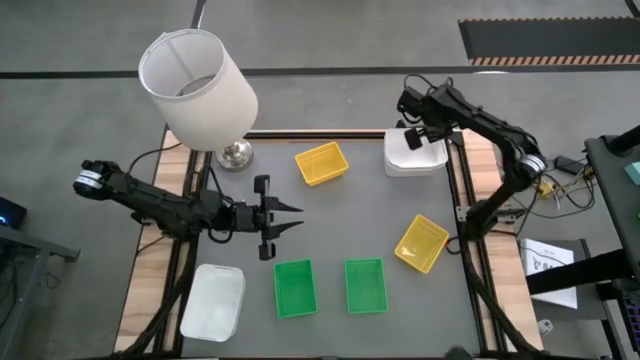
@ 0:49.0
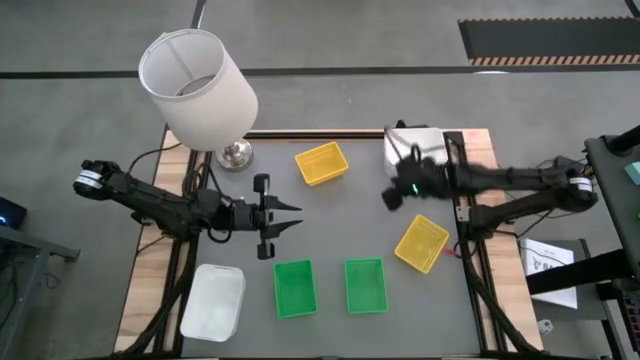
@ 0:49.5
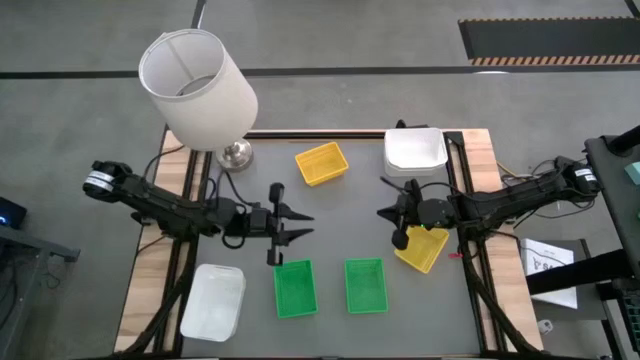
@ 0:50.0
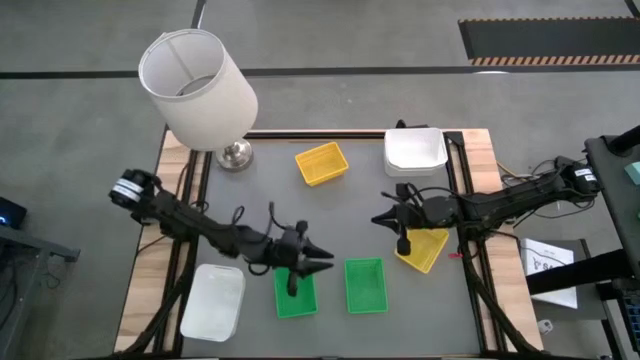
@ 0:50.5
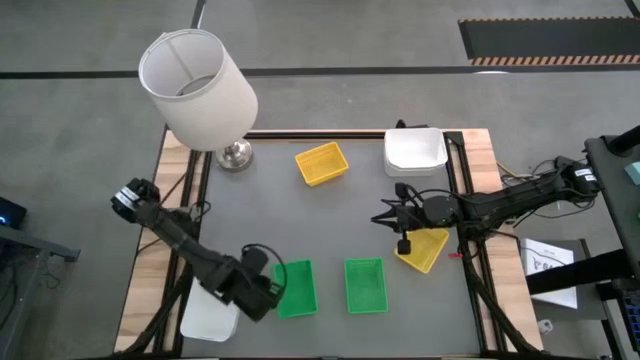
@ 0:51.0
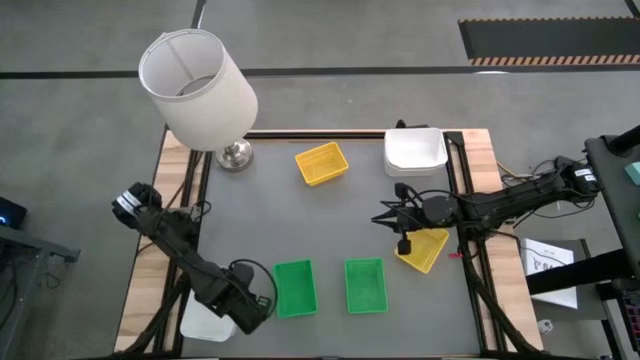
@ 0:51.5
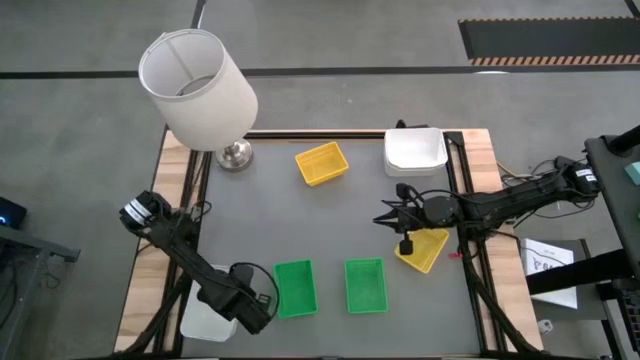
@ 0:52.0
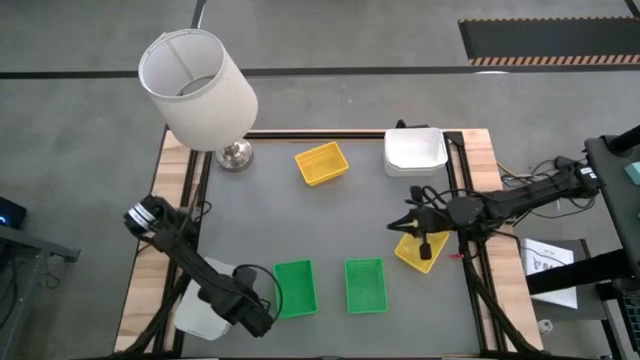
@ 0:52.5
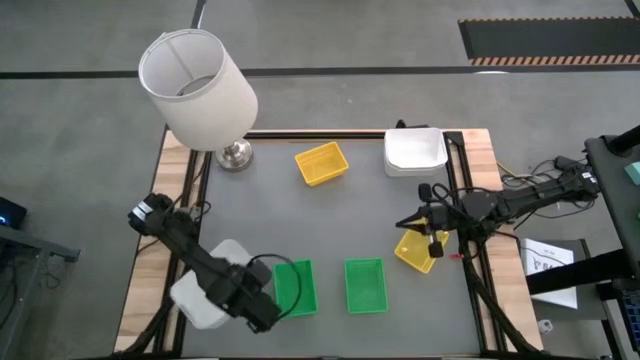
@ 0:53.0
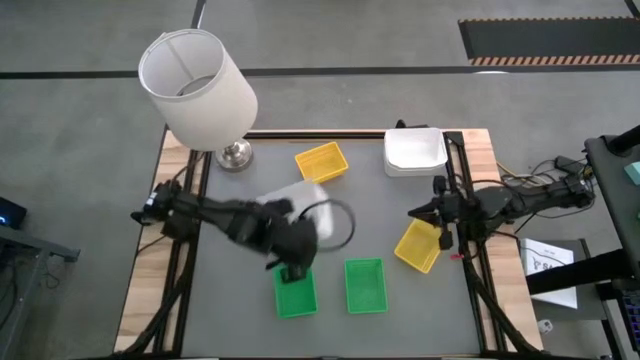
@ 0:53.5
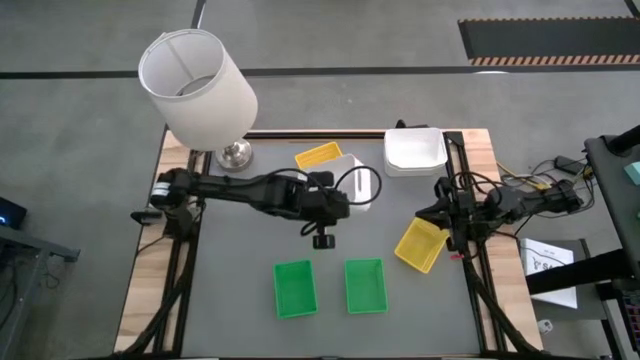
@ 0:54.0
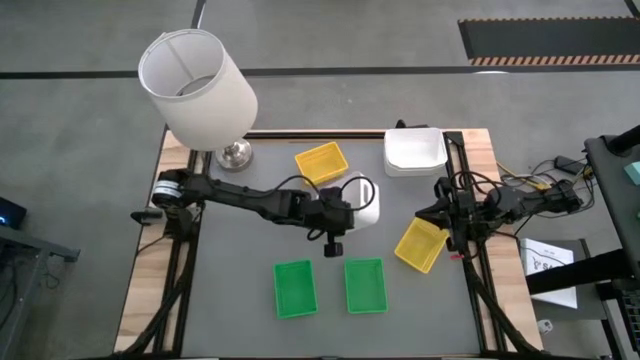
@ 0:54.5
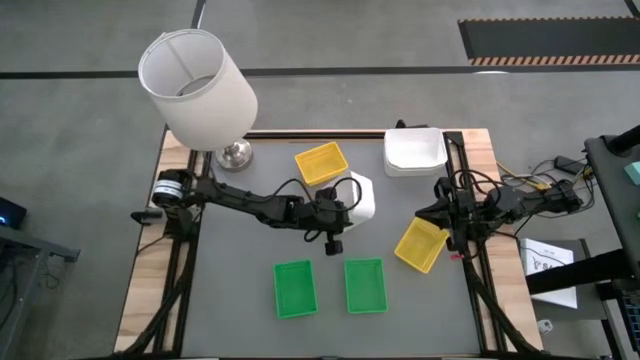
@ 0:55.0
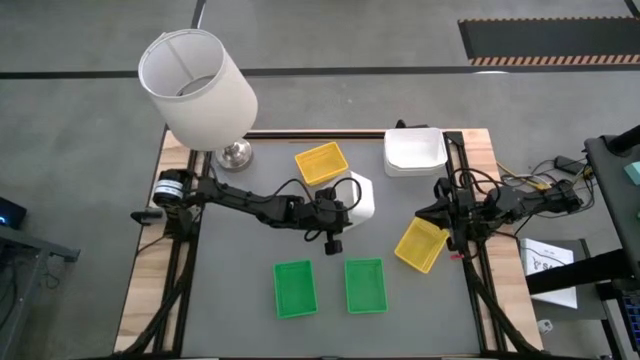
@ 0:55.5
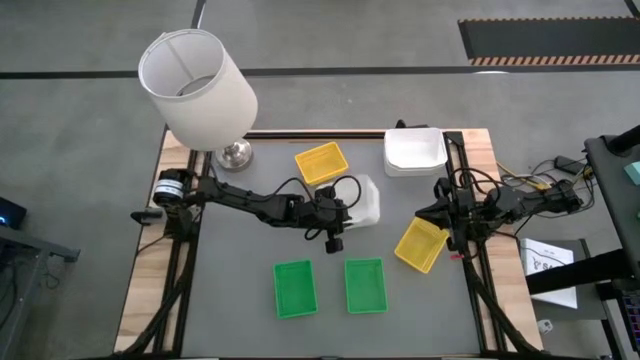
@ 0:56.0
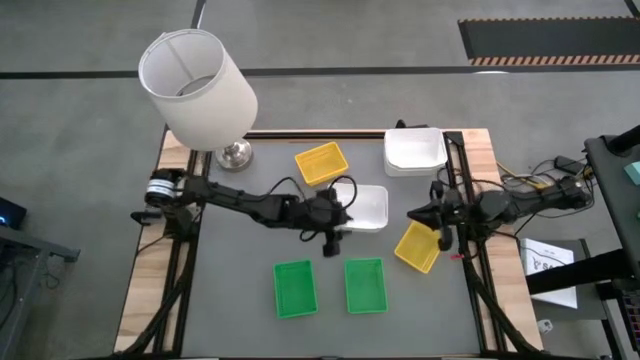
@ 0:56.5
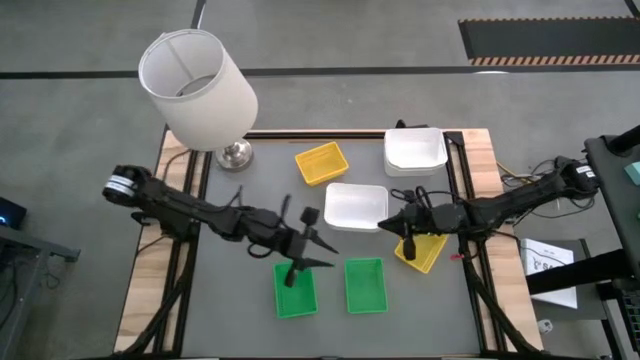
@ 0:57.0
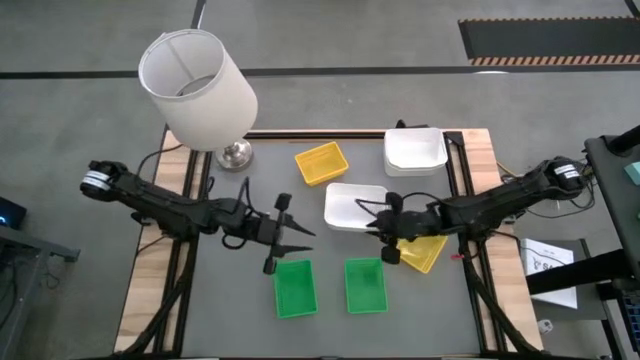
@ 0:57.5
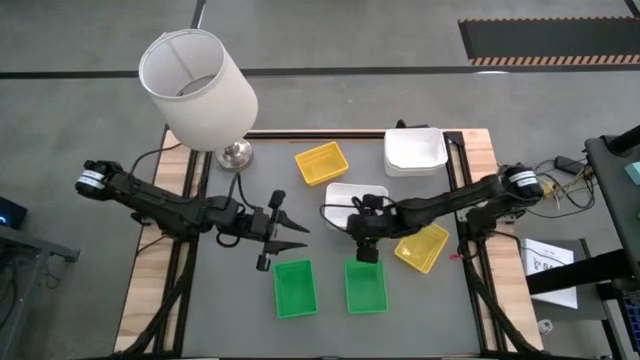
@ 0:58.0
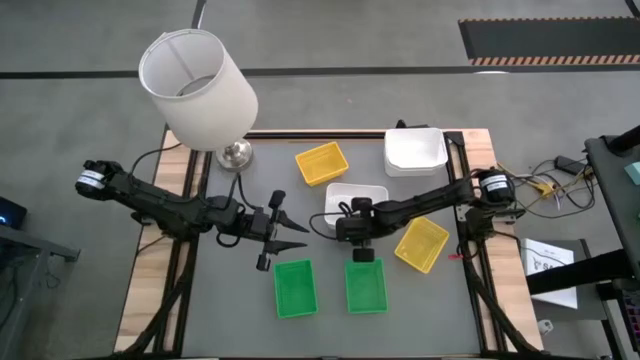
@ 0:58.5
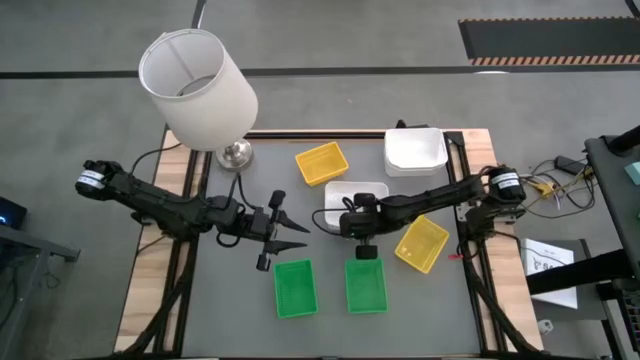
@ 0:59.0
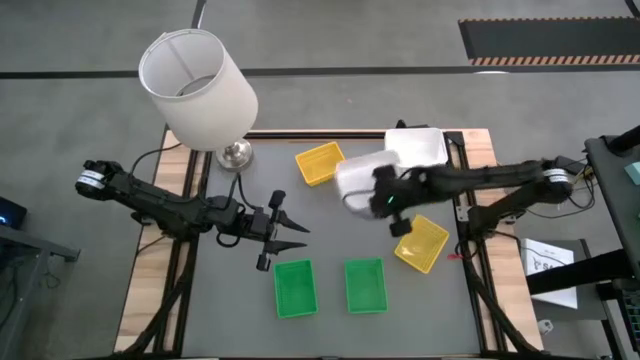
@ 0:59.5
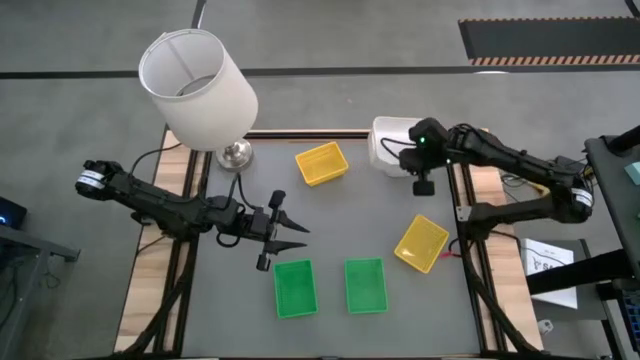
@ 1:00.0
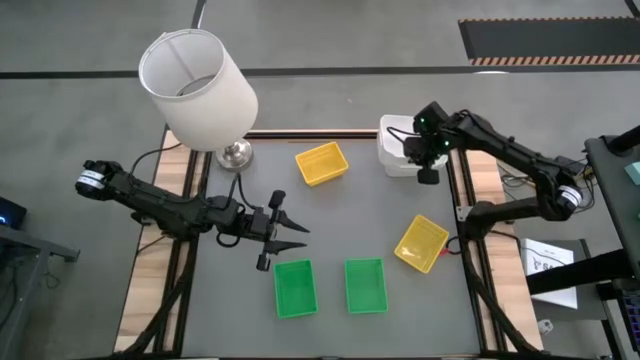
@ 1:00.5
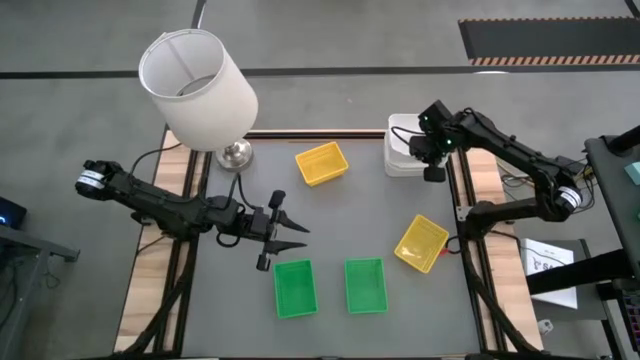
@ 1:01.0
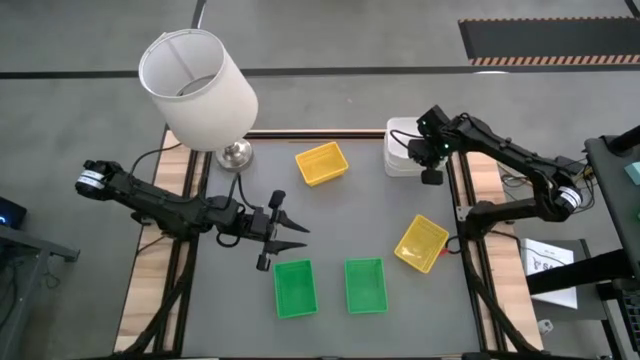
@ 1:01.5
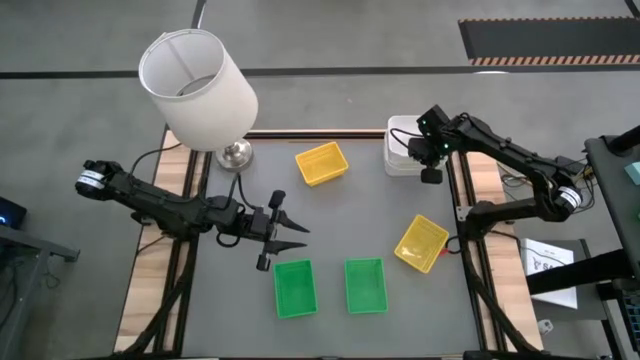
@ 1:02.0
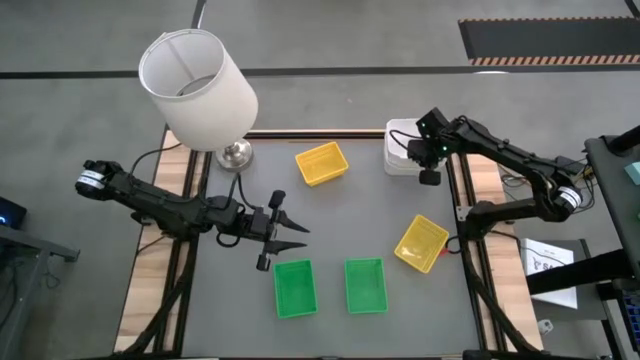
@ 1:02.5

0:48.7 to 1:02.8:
Stack the bottom white bin on the top white bin

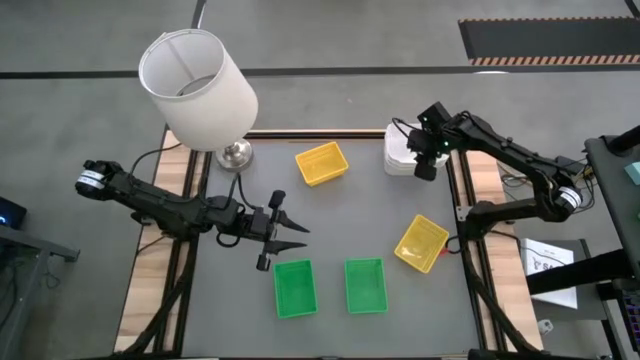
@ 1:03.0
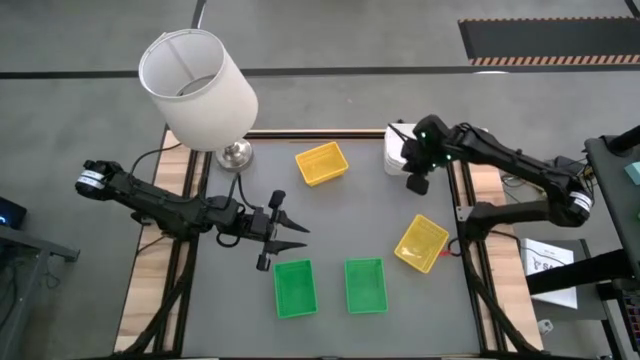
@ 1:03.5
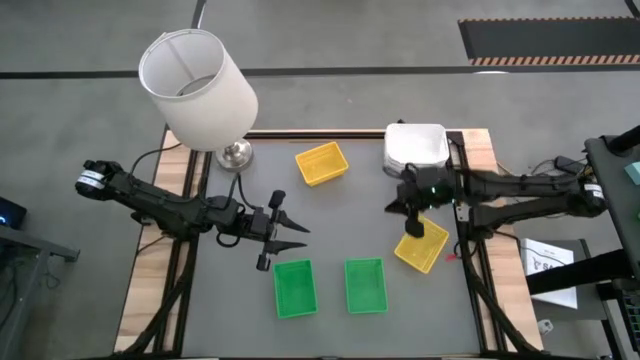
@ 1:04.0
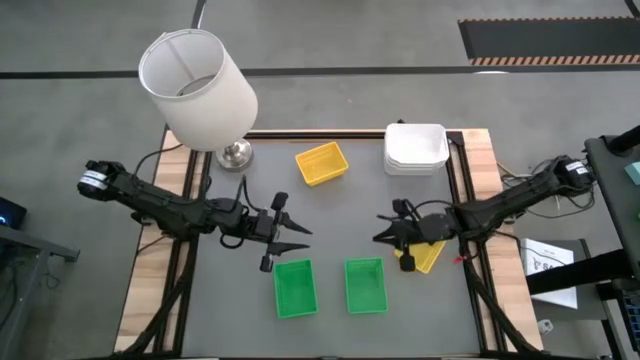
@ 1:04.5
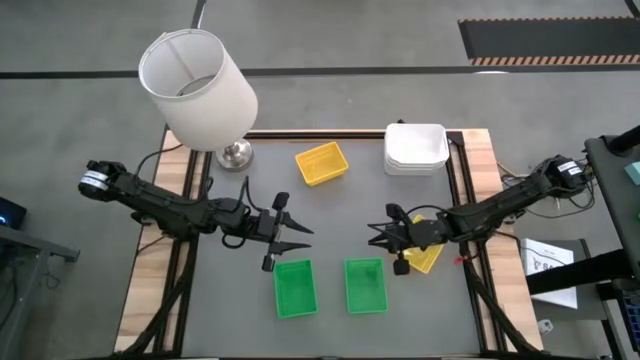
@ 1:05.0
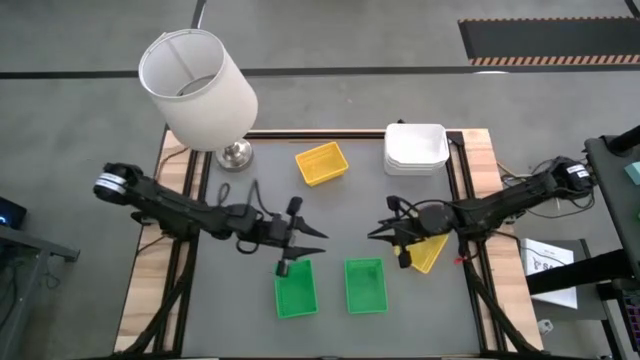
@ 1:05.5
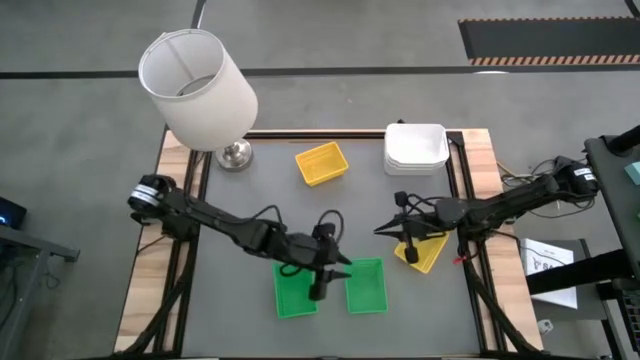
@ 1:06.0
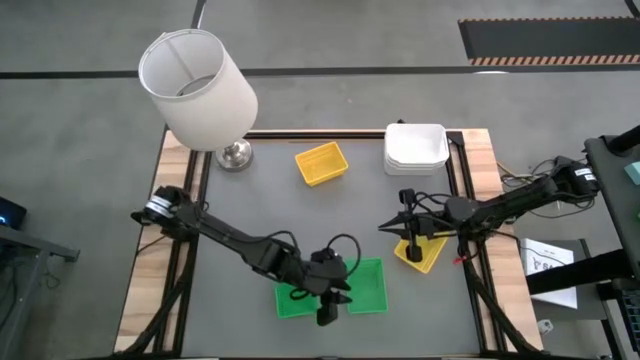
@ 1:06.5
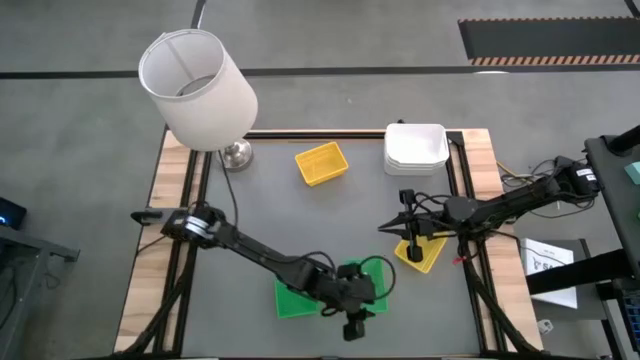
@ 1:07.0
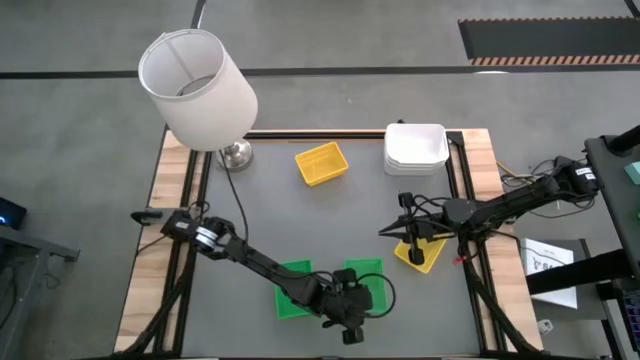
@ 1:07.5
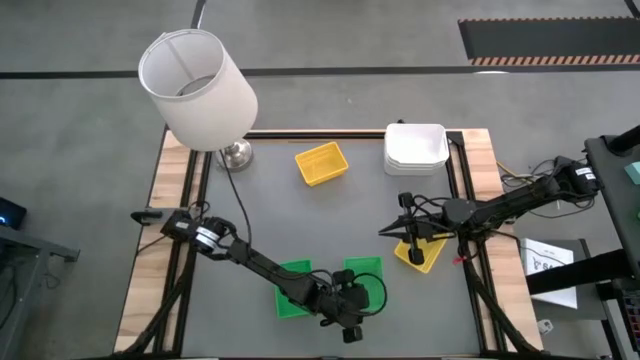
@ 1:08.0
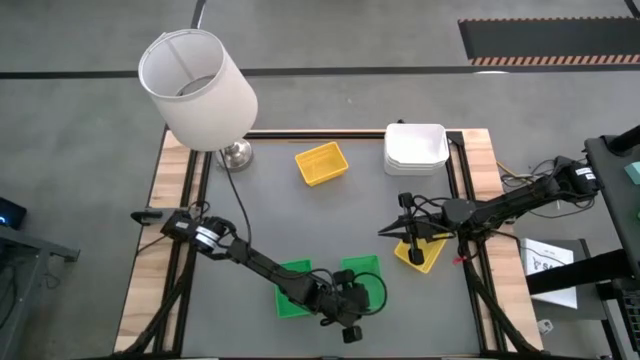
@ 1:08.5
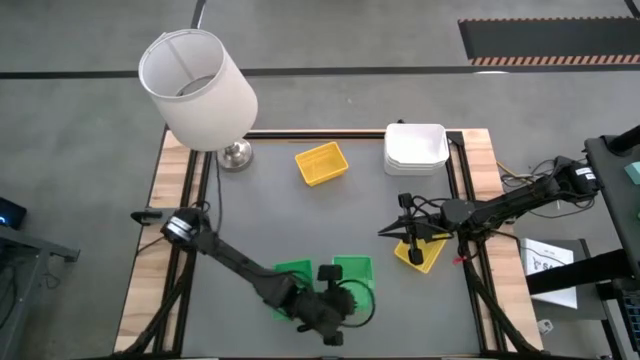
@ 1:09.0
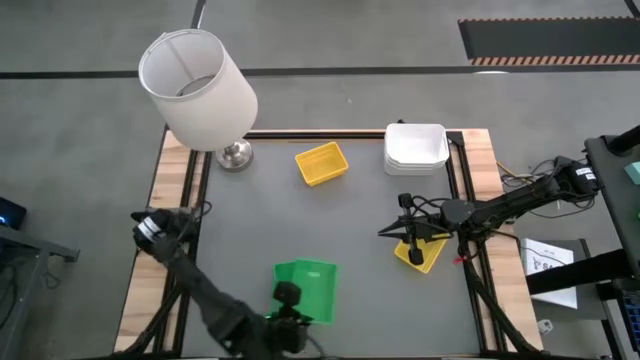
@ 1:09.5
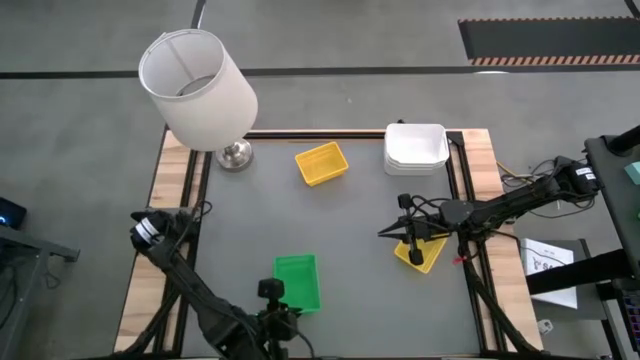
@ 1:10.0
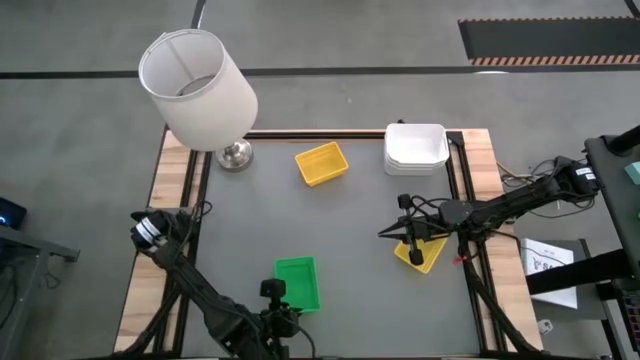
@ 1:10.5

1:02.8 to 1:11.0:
Stack the right green bin on the left green bin
